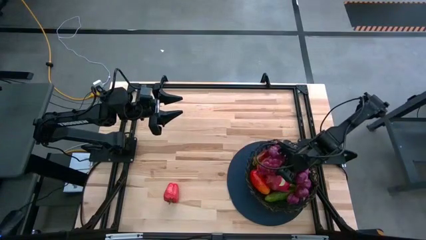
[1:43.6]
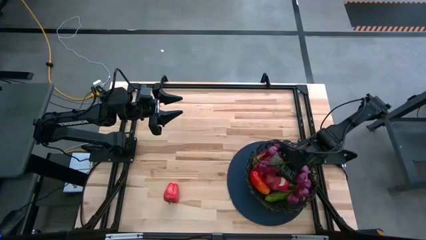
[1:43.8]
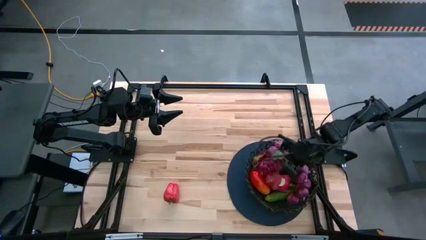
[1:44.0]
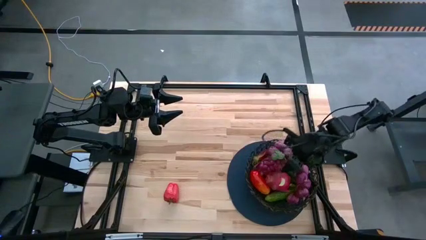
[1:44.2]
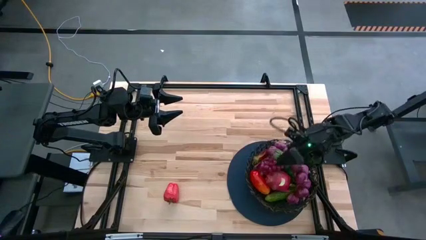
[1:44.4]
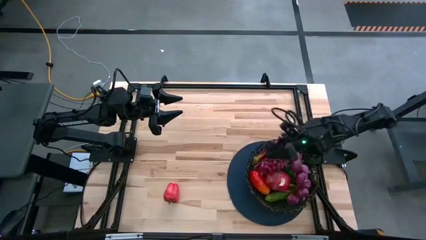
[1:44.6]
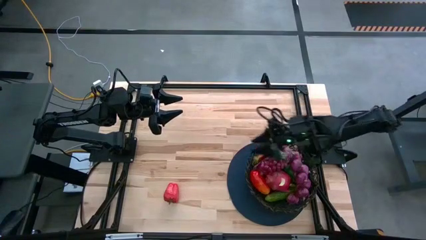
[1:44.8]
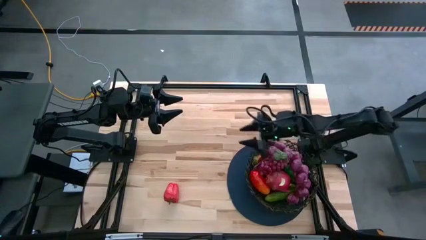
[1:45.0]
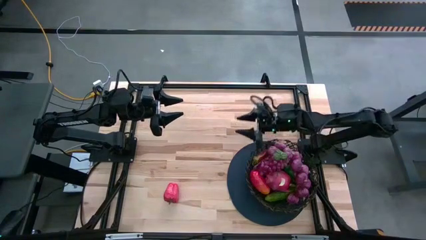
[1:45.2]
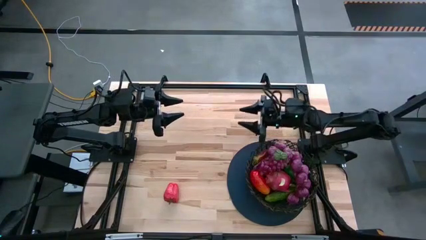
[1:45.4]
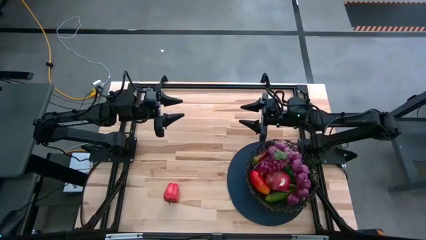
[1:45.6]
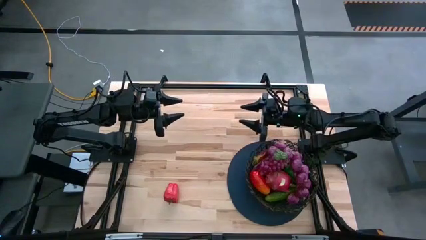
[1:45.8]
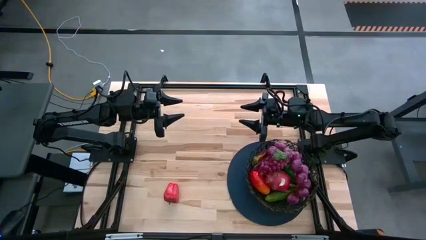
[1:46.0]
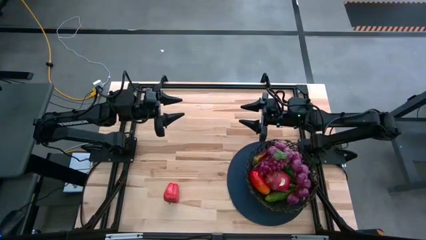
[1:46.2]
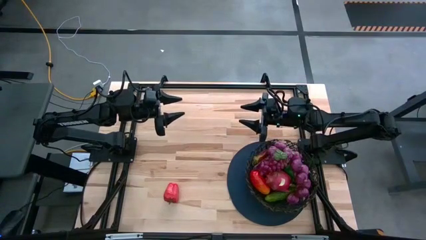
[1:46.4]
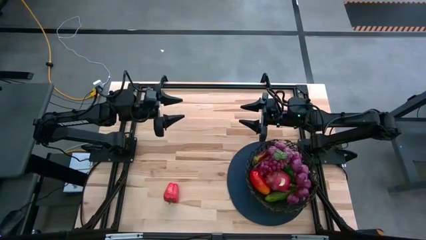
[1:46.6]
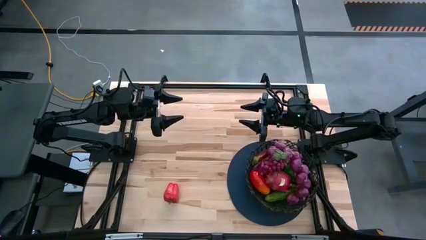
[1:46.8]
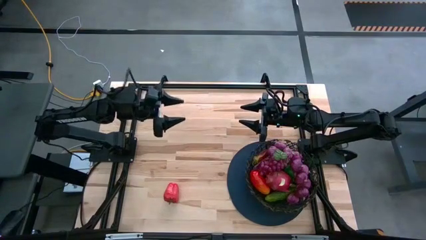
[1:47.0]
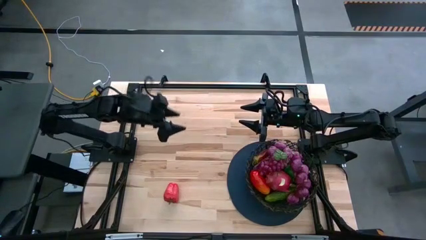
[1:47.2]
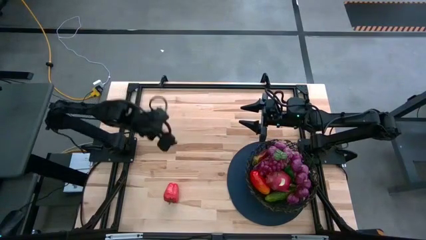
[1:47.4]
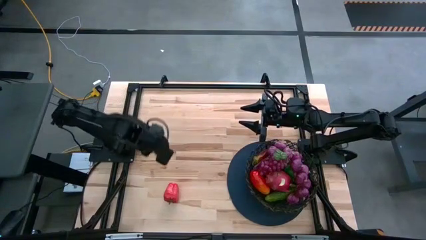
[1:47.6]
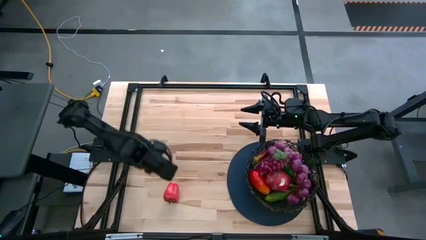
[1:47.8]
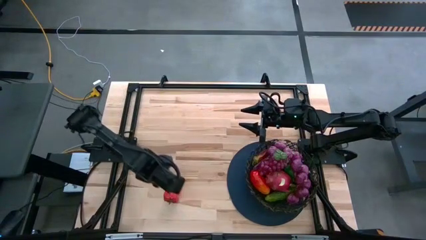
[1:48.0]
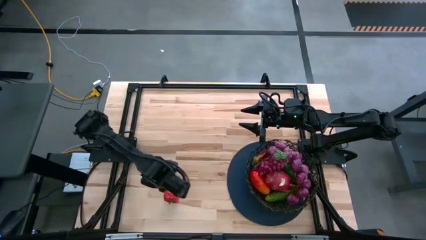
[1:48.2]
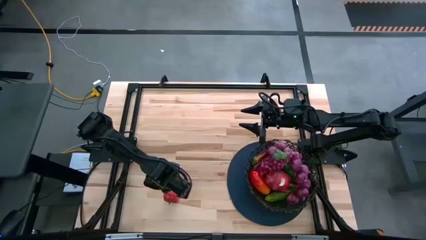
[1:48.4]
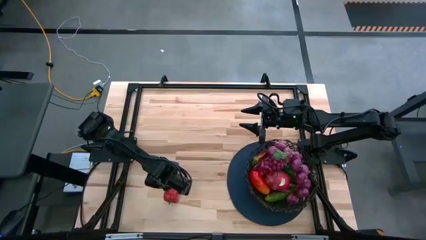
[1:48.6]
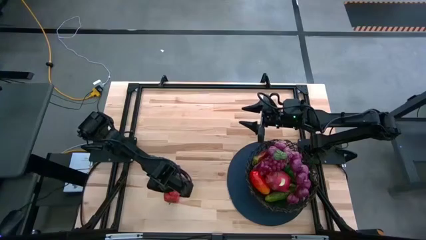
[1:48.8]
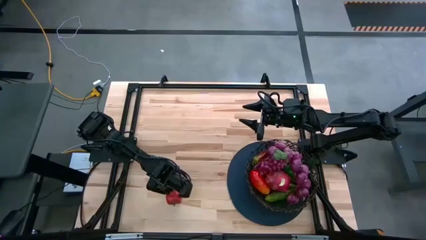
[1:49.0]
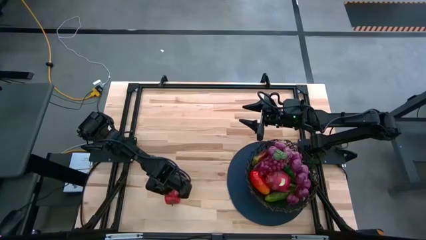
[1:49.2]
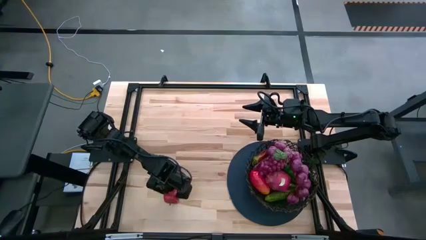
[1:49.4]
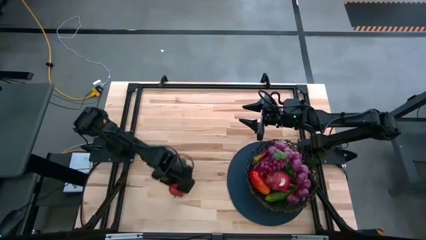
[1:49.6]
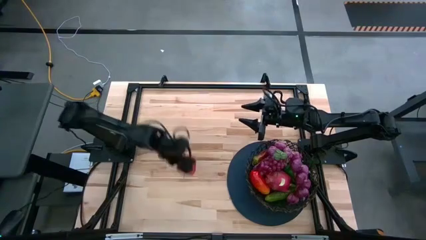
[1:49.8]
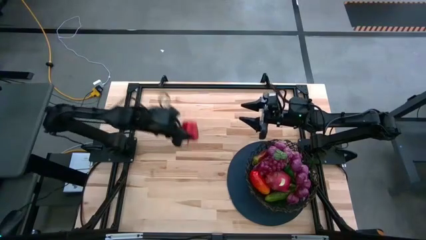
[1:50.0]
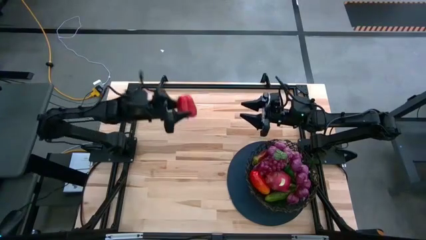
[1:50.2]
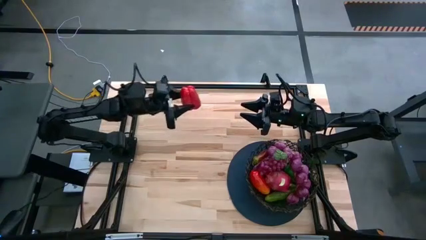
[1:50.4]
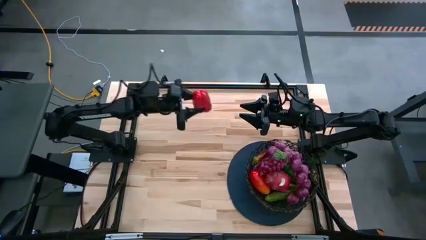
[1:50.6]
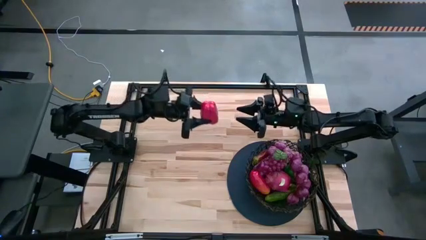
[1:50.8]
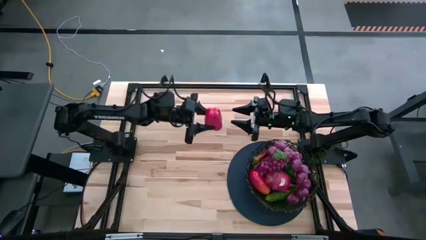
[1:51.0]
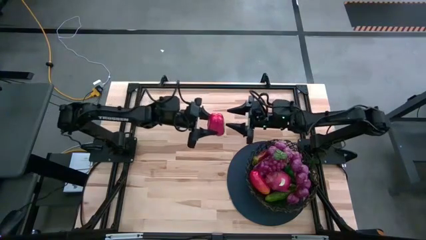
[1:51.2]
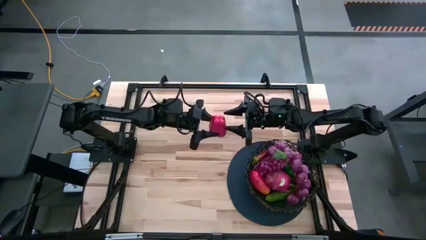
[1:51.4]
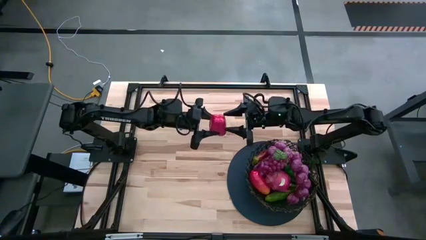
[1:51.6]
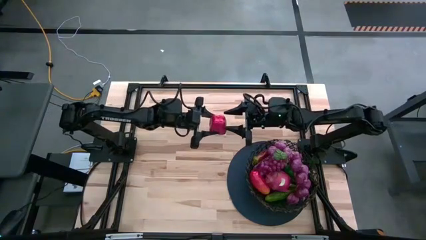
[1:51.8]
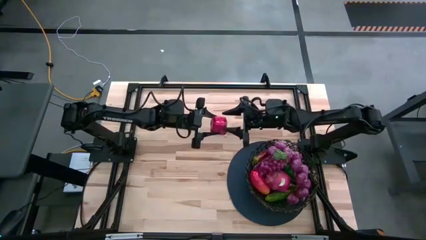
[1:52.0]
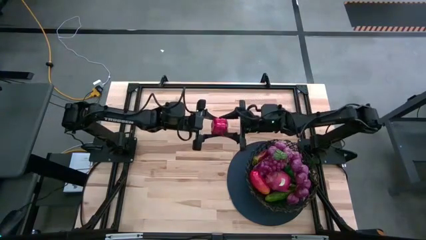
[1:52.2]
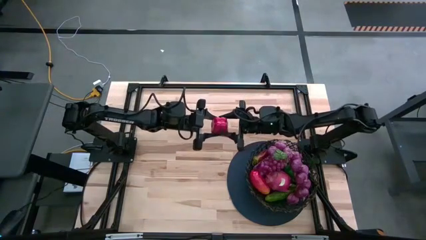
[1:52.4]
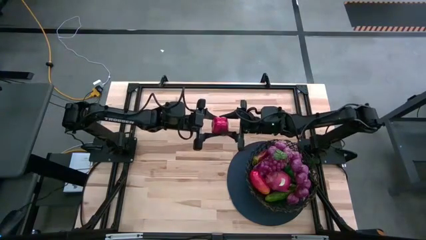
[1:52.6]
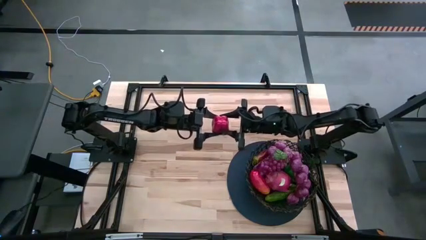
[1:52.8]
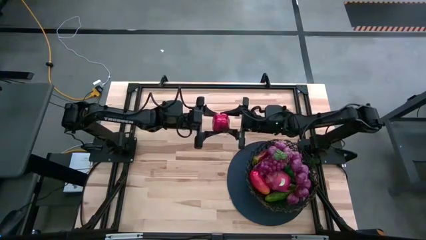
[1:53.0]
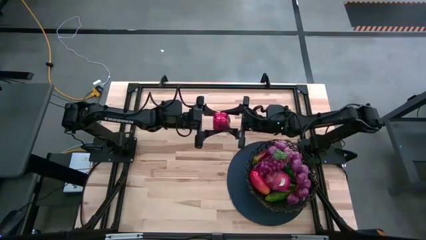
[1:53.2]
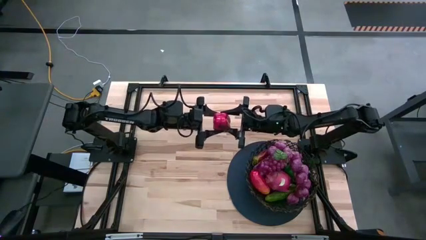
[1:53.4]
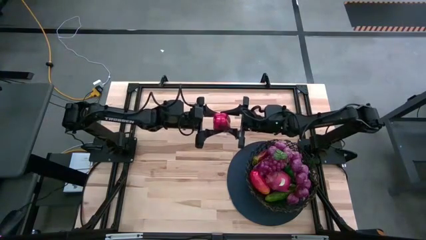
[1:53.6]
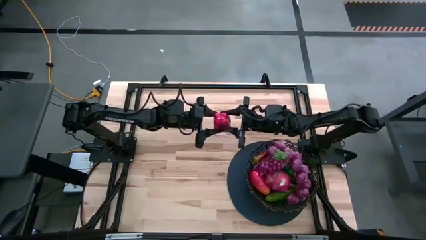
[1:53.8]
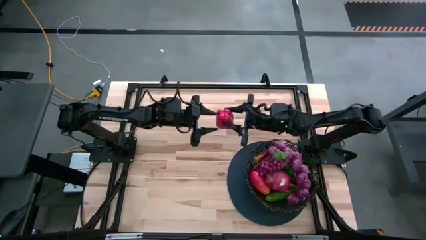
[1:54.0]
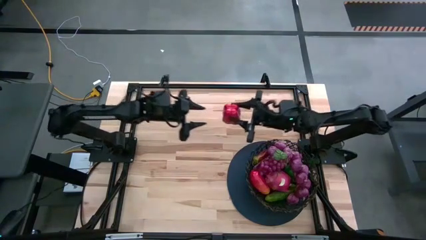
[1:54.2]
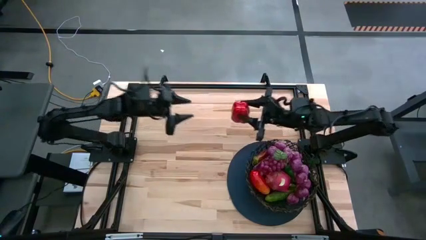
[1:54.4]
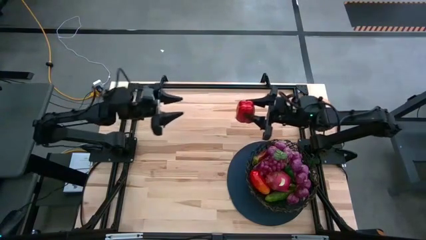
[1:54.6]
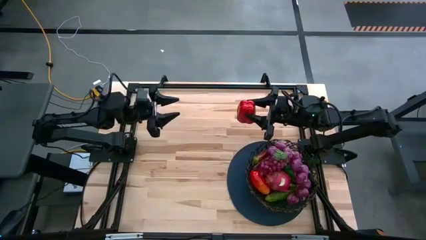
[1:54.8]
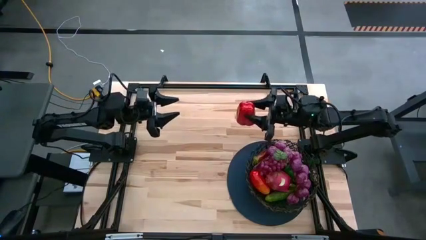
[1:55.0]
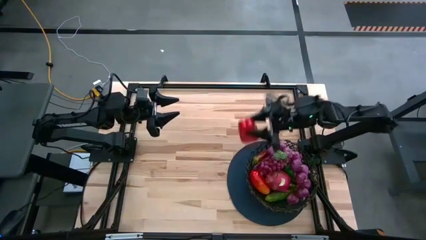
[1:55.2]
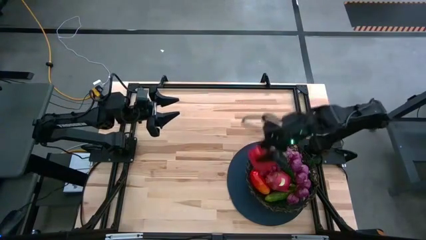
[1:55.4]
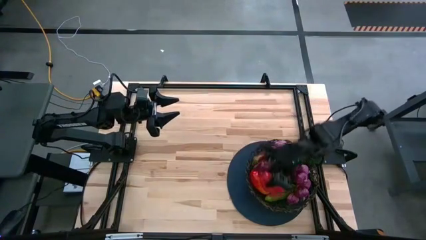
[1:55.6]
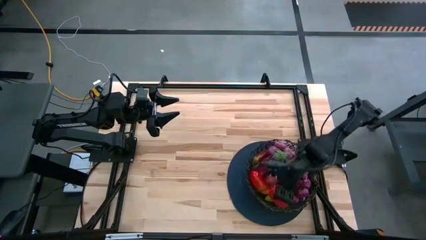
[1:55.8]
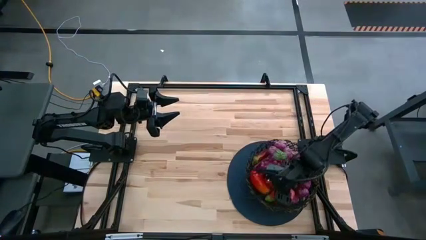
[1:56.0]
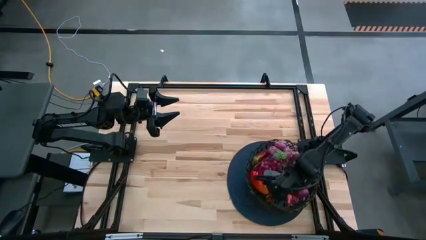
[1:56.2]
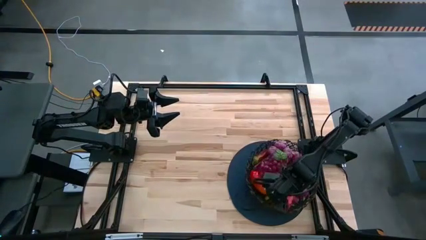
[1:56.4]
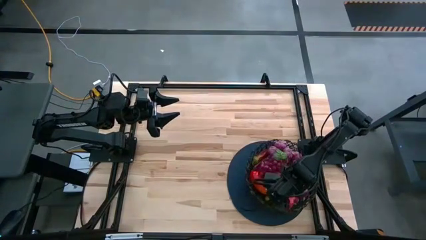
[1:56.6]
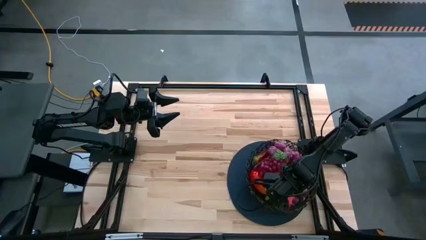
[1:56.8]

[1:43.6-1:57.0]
Task: Build produce basket
Put the red bell pepper into the basket
